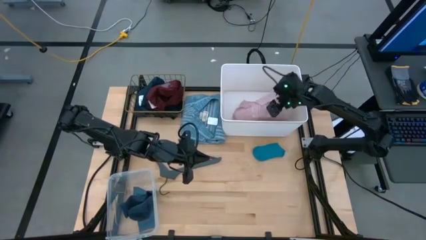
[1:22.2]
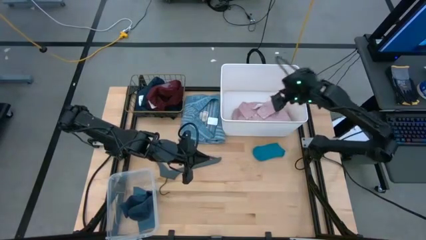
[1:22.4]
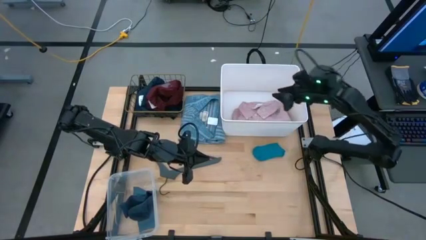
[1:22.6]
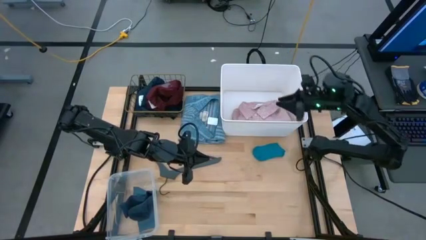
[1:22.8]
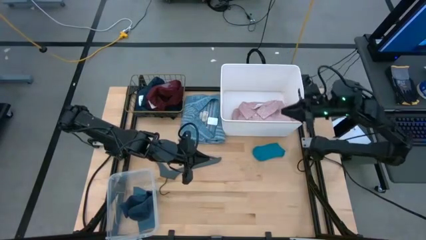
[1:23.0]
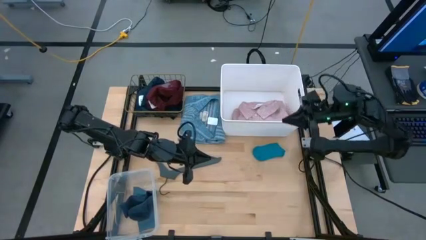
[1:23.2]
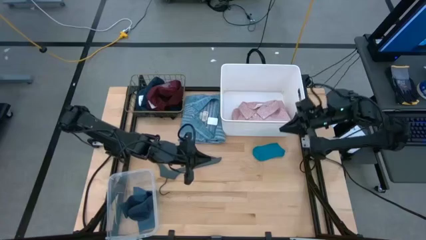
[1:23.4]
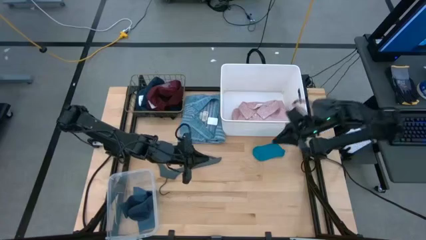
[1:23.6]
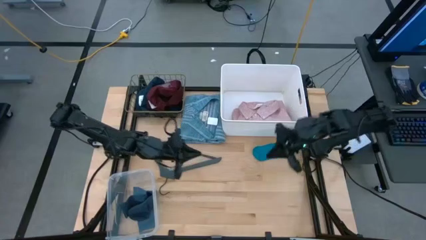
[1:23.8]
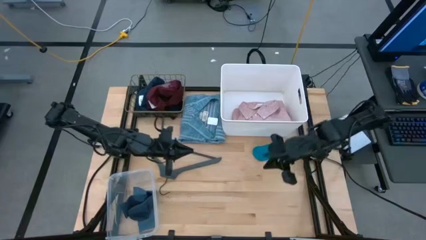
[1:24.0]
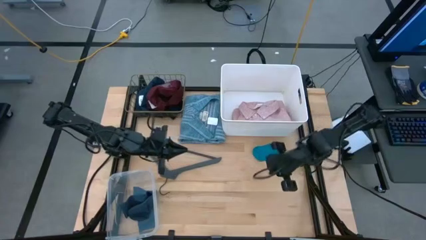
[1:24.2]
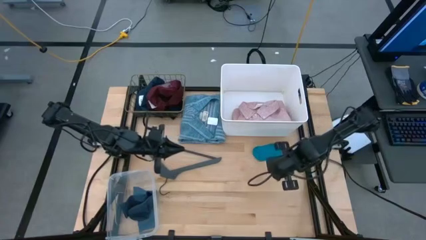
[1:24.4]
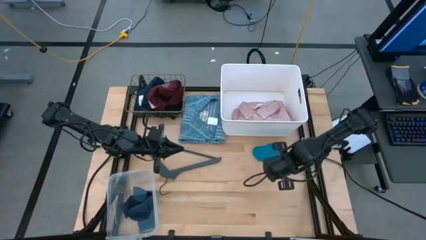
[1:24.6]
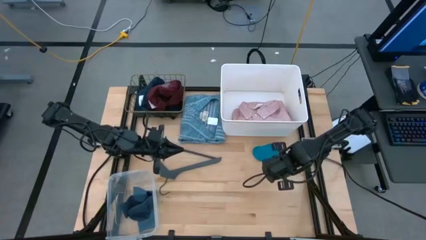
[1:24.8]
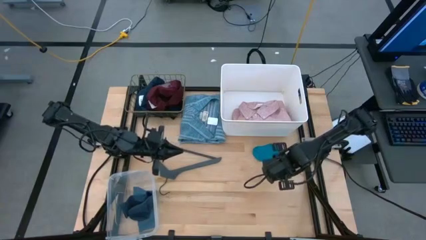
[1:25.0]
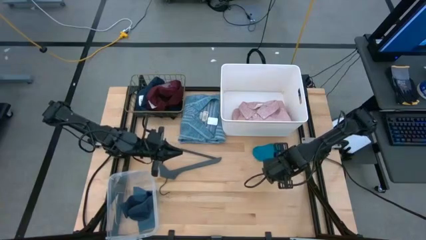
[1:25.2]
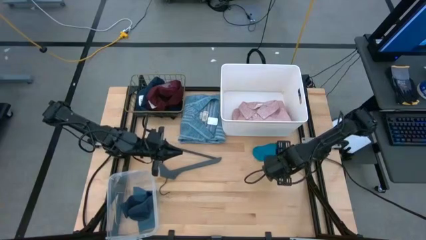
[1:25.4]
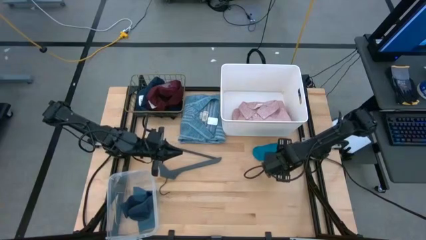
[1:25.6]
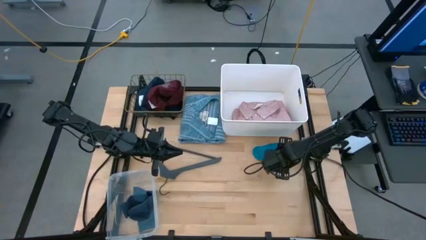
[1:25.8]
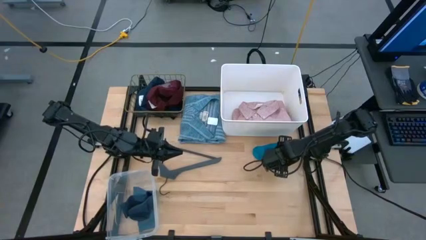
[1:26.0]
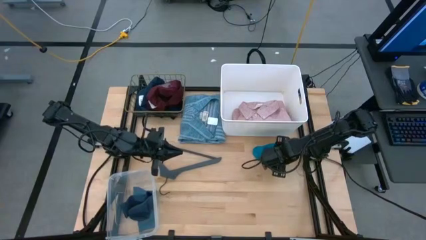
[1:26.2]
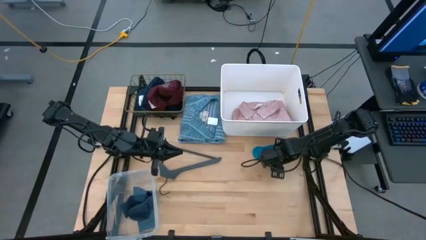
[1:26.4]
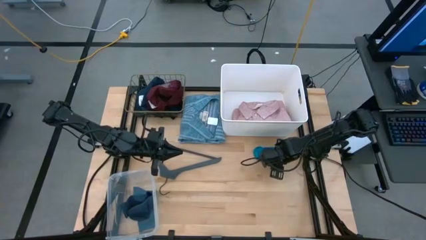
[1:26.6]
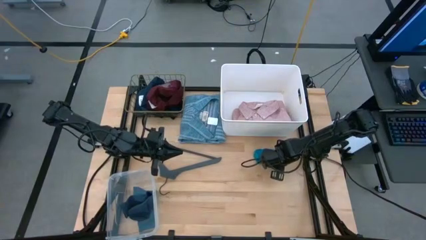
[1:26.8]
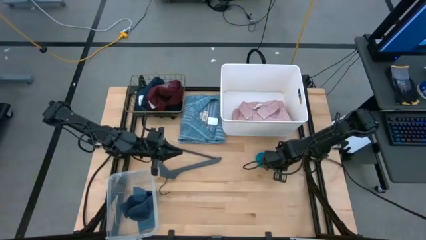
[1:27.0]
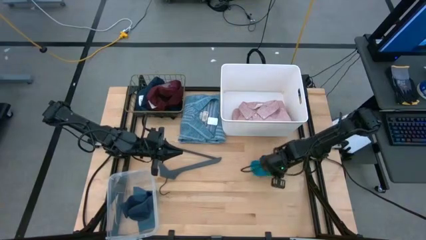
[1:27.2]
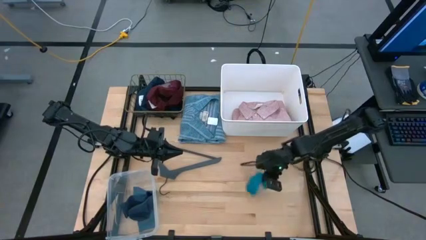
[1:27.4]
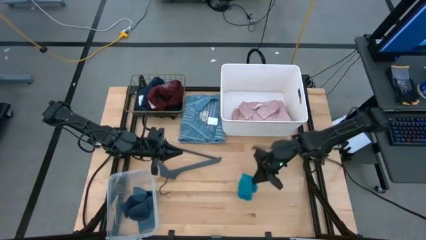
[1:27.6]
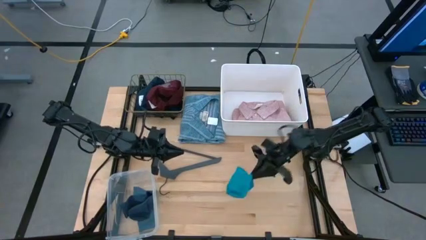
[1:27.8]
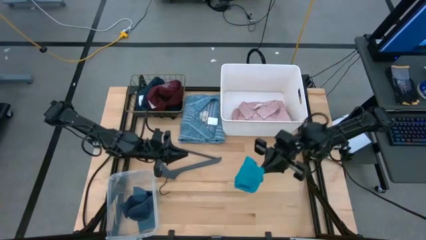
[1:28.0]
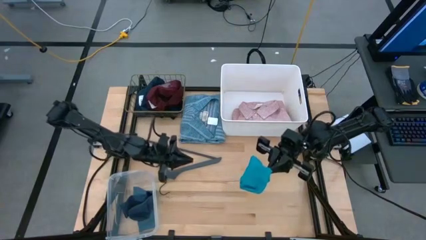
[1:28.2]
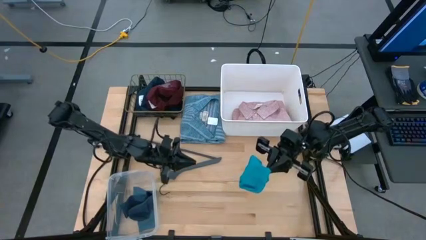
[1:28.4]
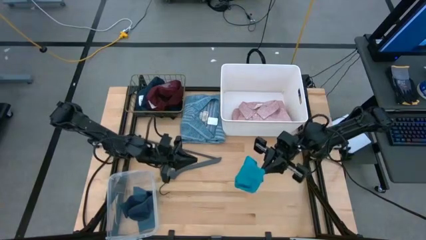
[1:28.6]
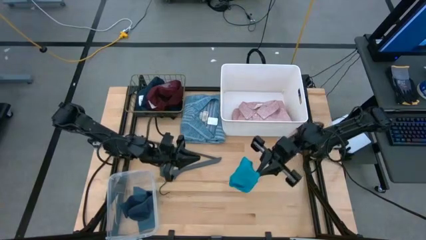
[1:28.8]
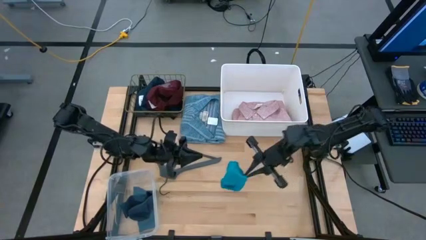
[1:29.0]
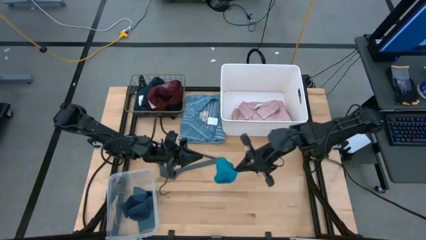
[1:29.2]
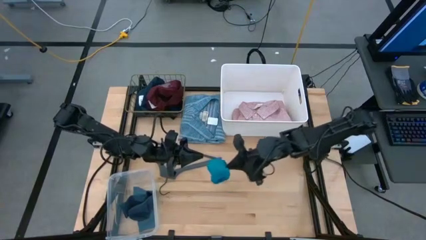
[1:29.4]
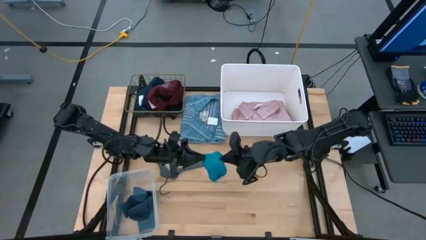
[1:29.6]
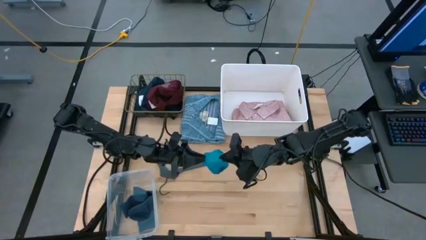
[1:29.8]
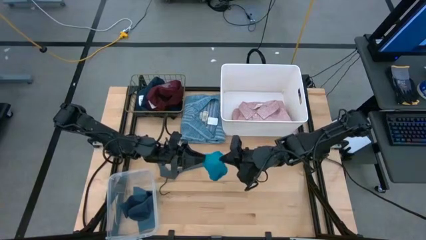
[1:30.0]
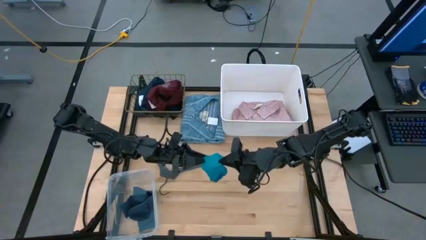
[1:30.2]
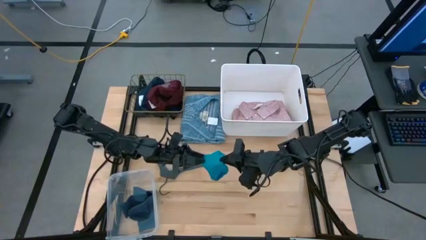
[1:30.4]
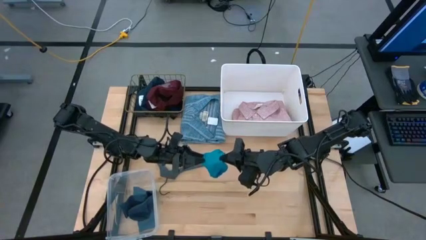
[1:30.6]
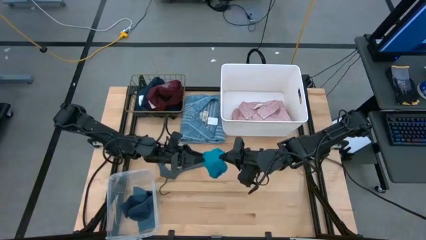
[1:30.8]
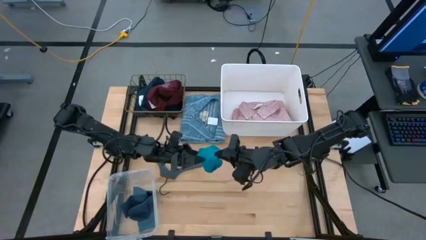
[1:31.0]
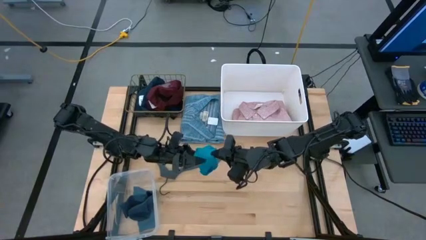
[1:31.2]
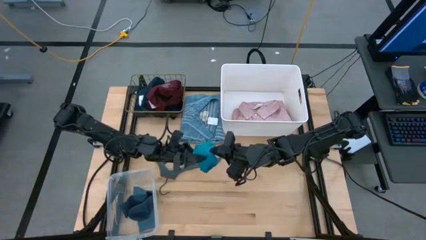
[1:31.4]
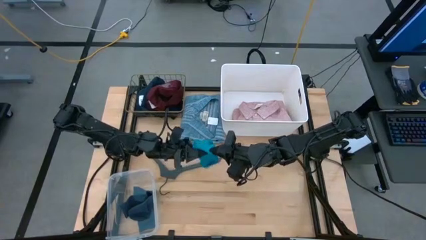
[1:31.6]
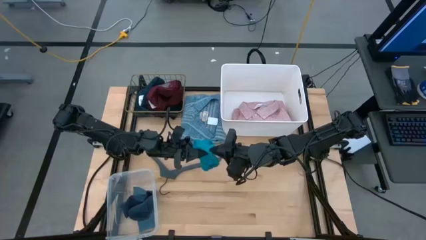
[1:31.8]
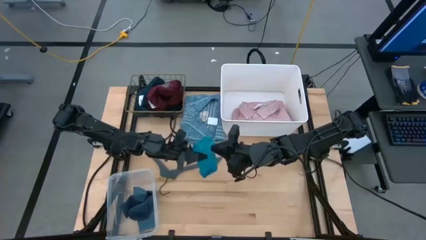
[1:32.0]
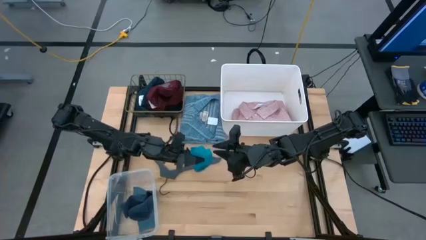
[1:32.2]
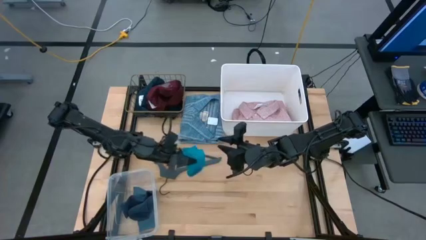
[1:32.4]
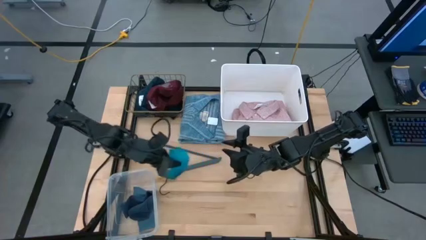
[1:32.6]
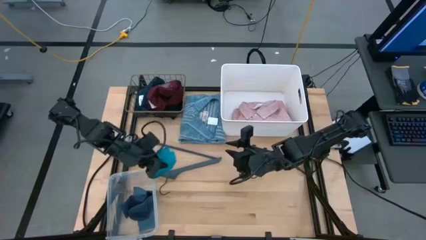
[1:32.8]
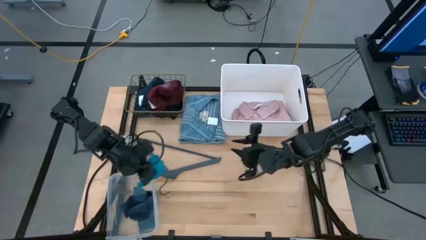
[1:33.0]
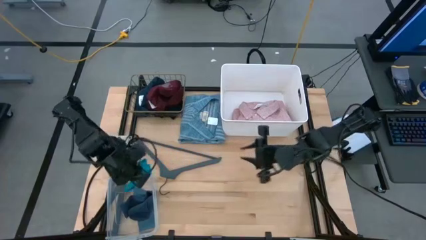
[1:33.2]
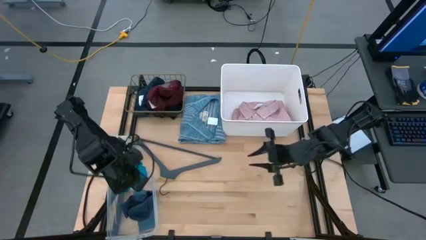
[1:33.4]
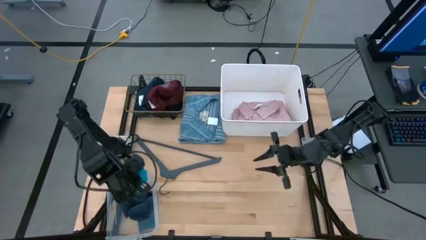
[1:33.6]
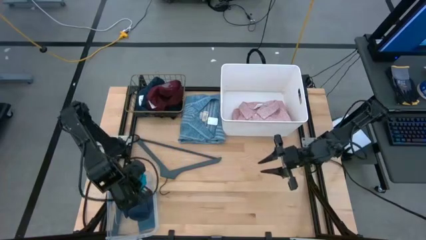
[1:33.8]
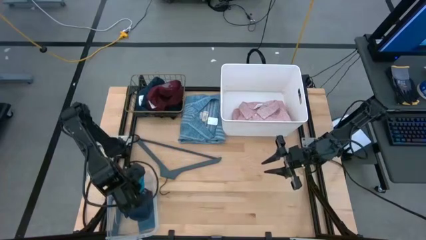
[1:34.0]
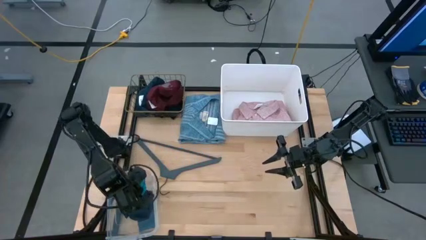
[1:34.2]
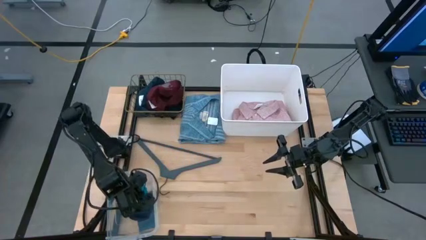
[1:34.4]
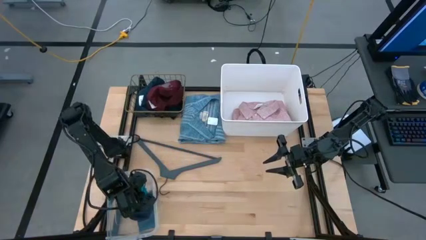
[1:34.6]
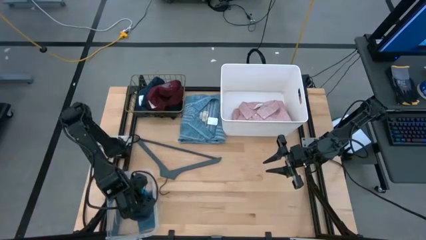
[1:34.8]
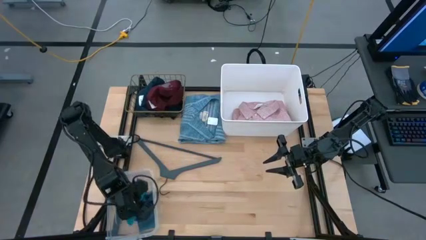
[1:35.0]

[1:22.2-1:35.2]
Task: Pick & Place Cloths
Put the blue sock into the transparent bin
